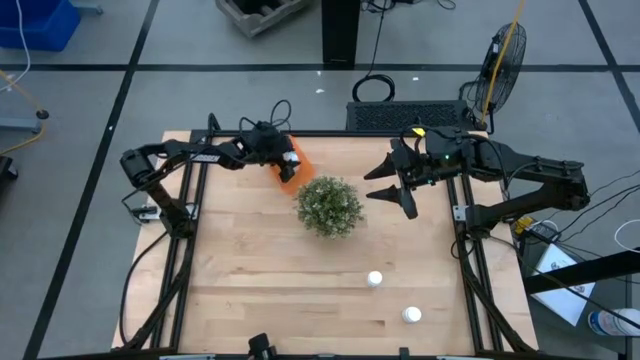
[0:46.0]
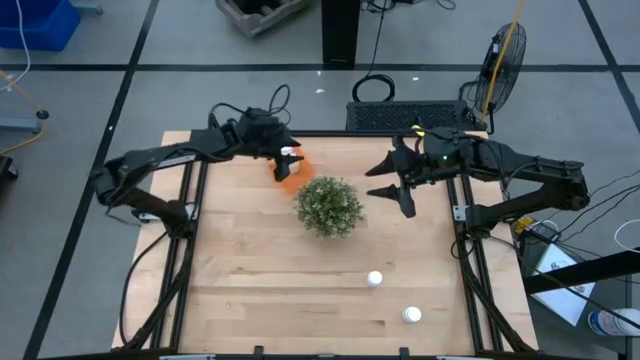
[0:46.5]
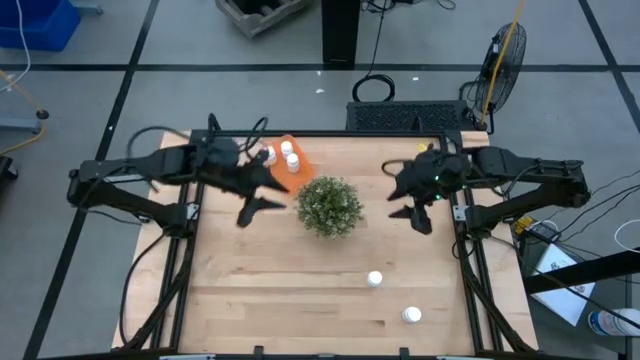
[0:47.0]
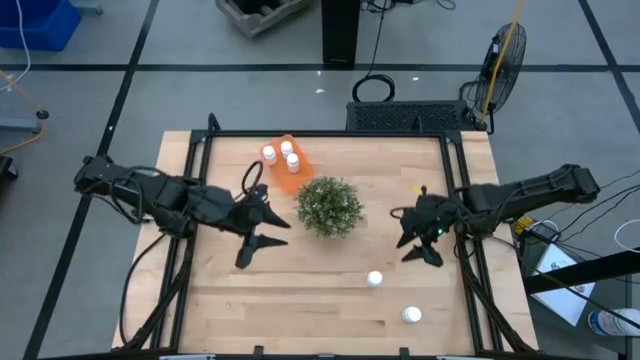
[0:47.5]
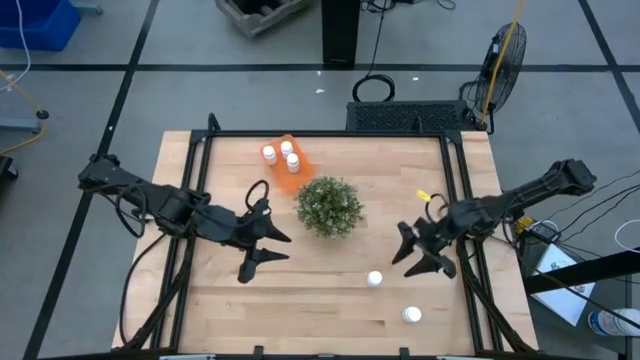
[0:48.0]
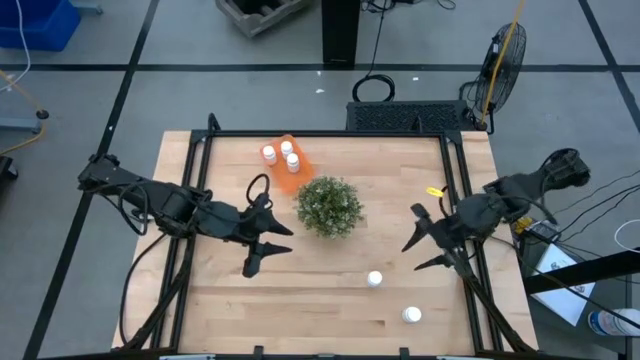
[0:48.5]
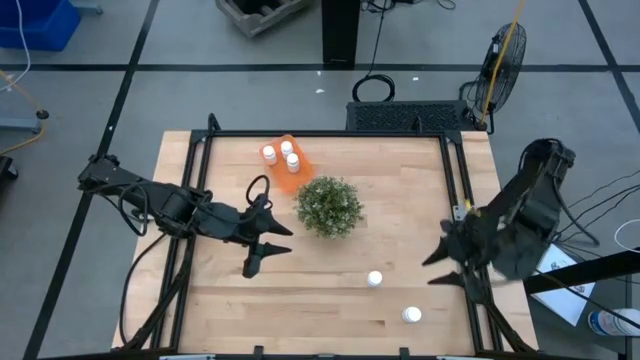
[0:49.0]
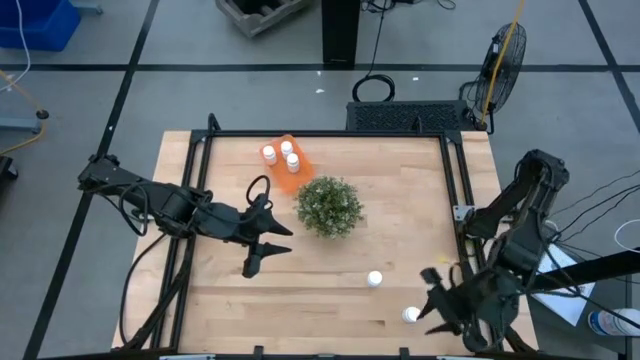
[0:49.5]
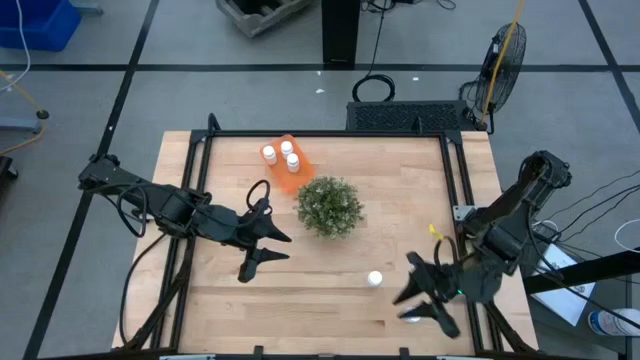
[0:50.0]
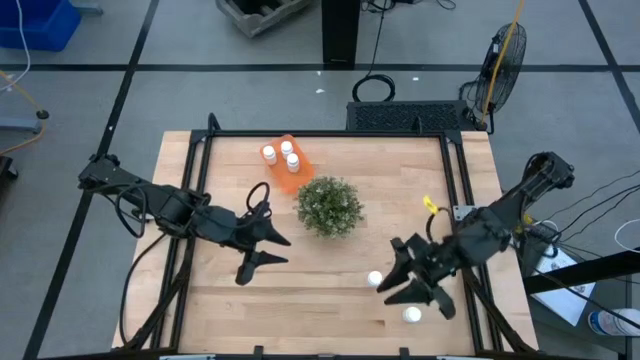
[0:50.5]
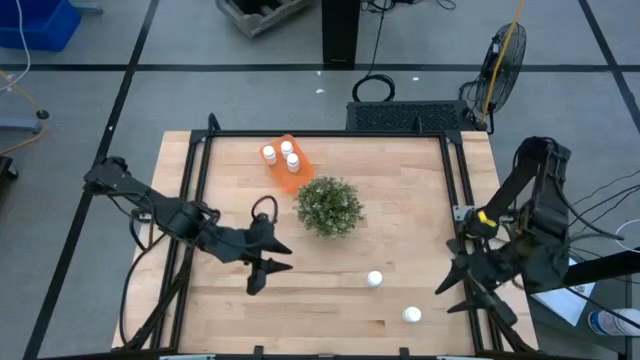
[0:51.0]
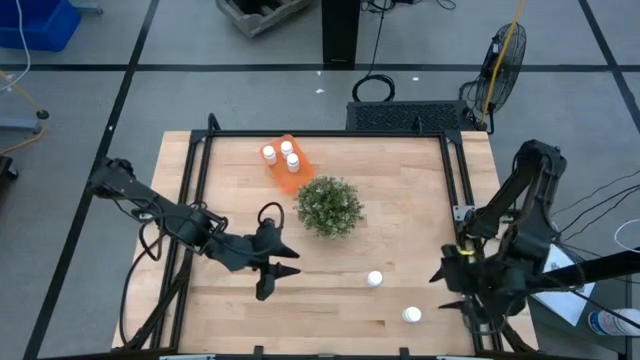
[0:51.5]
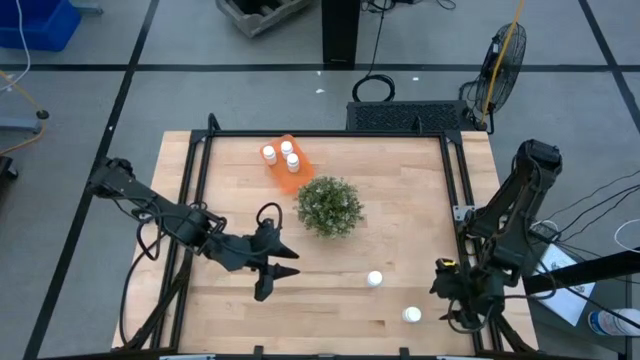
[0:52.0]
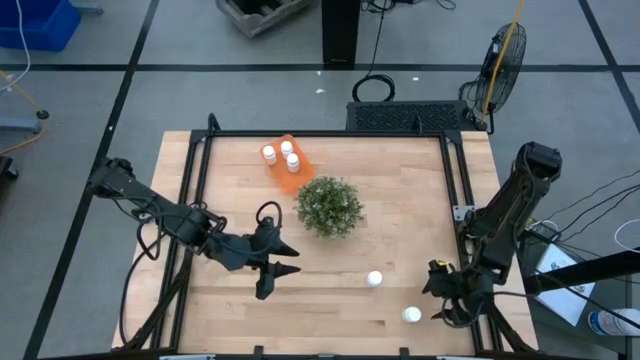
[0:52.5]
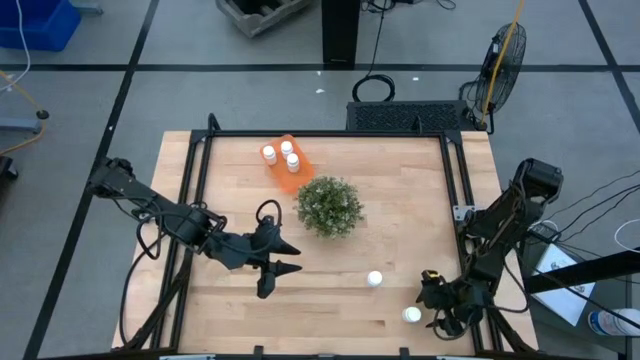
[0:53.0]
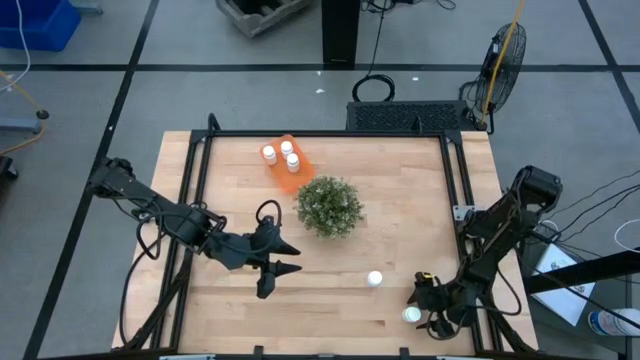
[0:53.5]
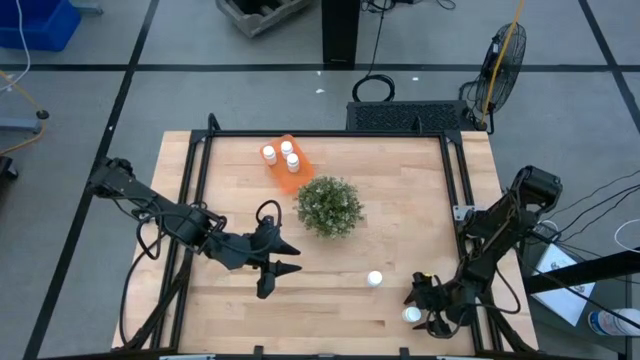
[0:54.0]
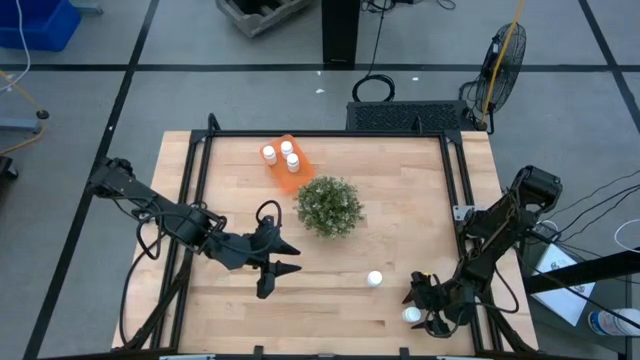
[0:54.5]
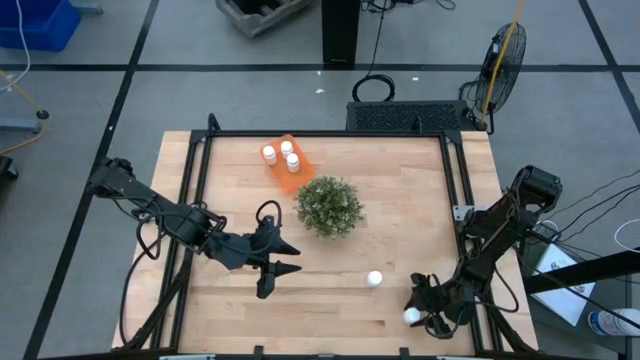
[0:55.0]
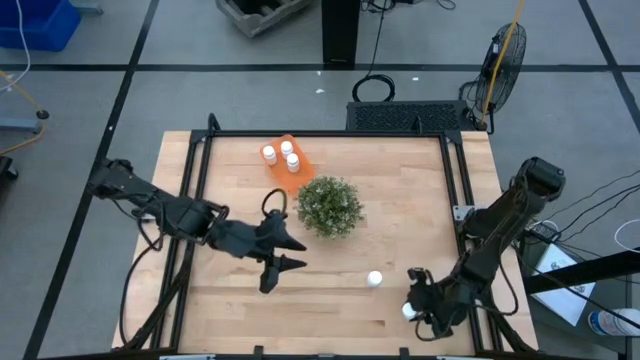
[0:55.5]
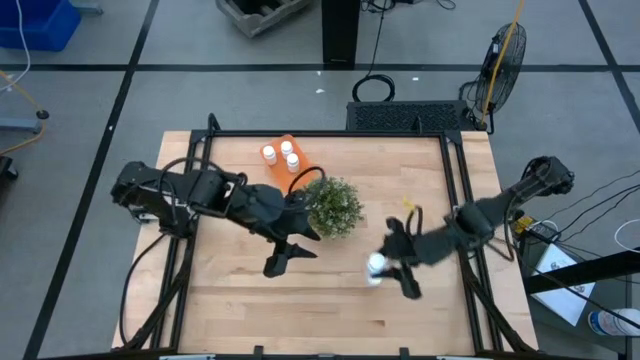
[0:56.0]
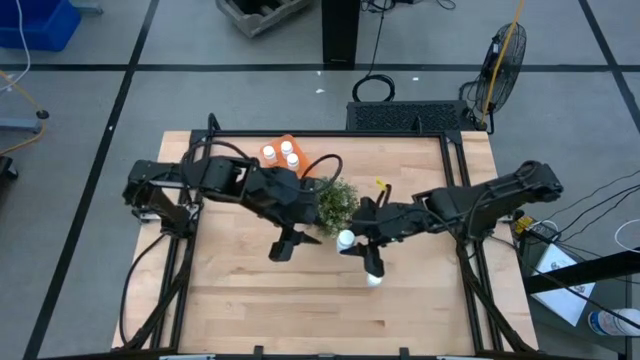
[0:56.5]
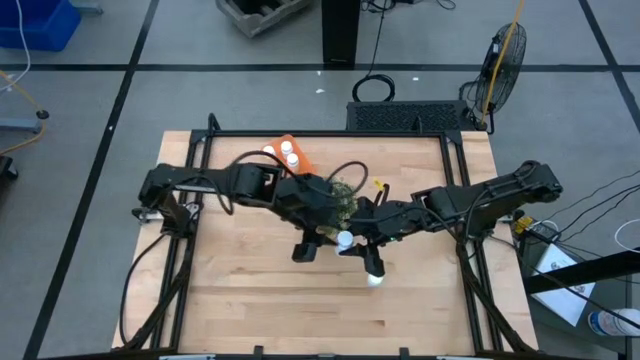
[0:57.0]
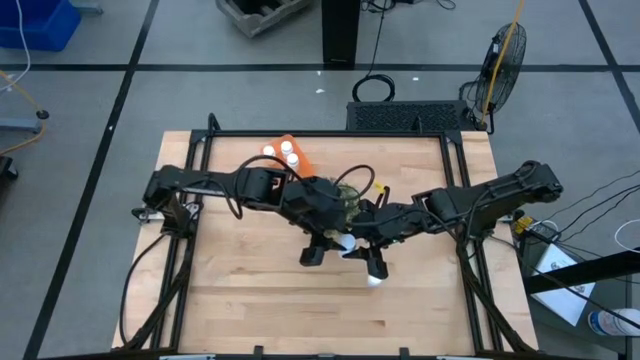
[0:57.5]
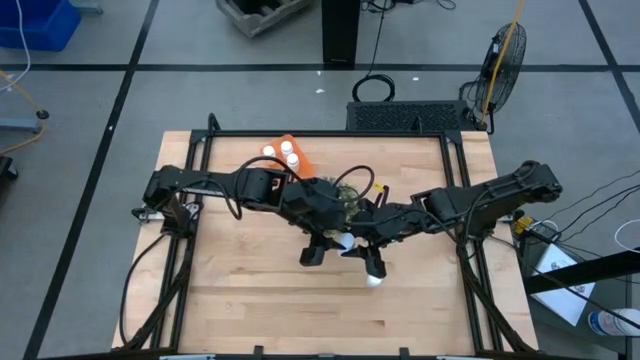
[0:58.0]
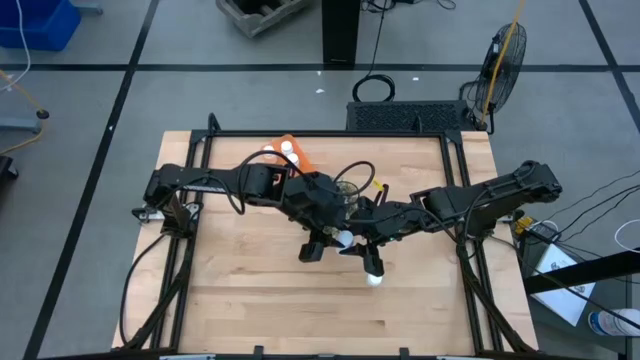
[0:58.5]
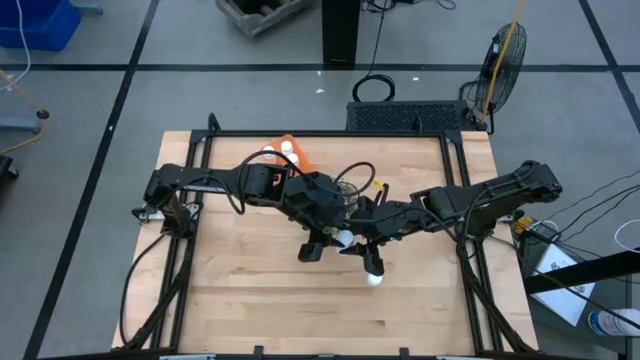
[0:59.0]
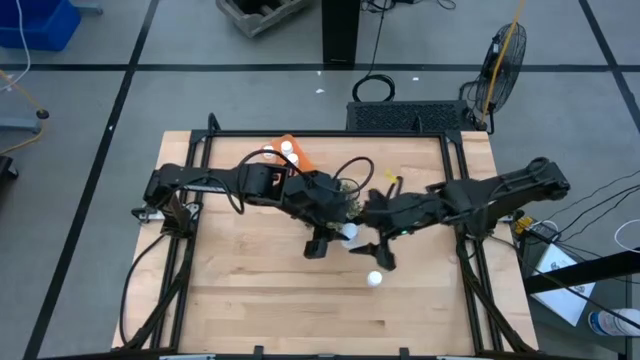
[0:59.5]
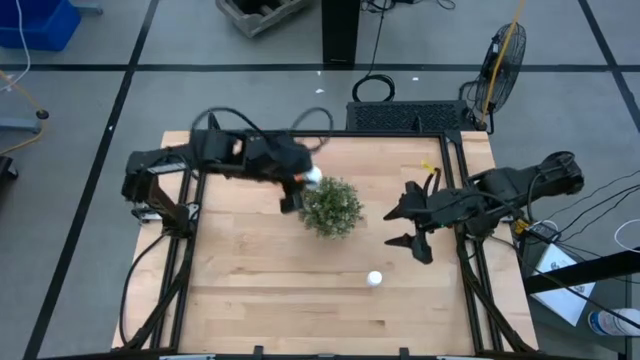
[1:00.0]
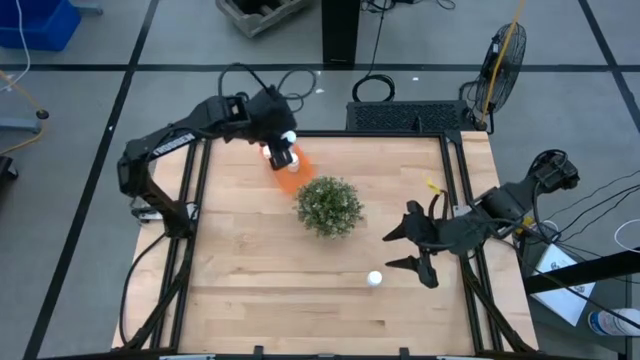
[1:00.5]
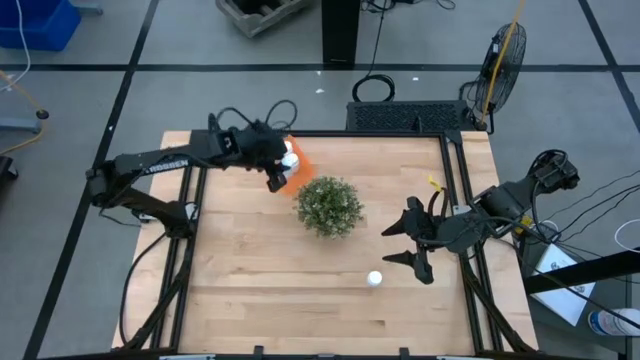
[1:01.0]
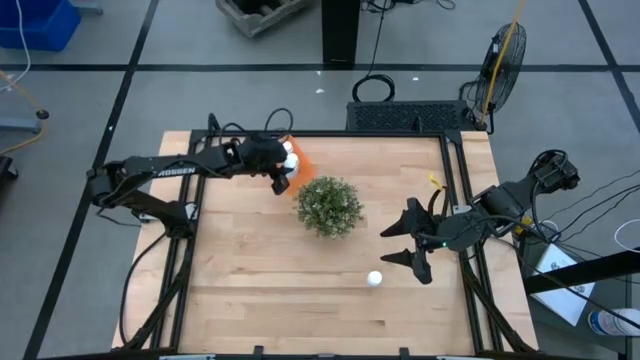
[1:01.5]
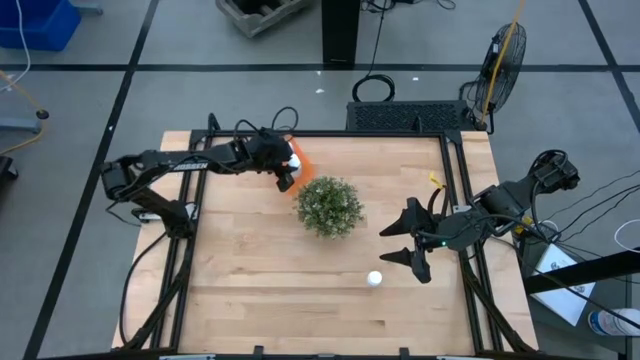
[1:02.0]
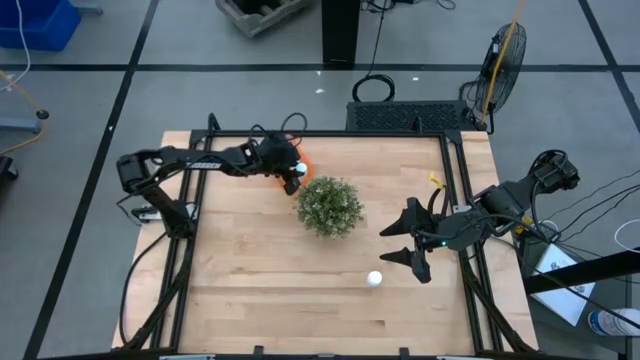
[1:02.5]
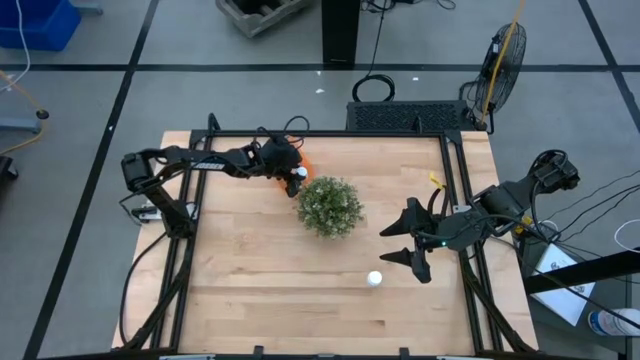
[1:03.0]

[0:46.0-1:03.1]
Task: Pick and place pill bottles into a basket
Put the white medicine bottle into the orange bin

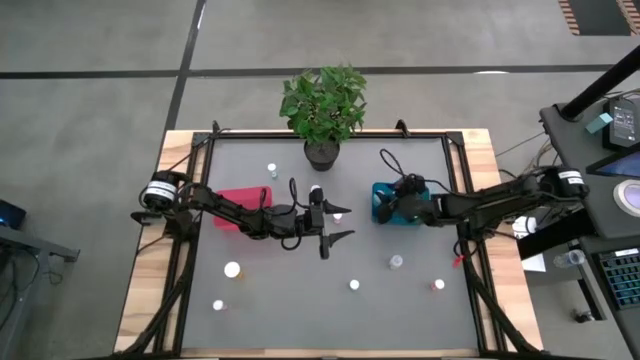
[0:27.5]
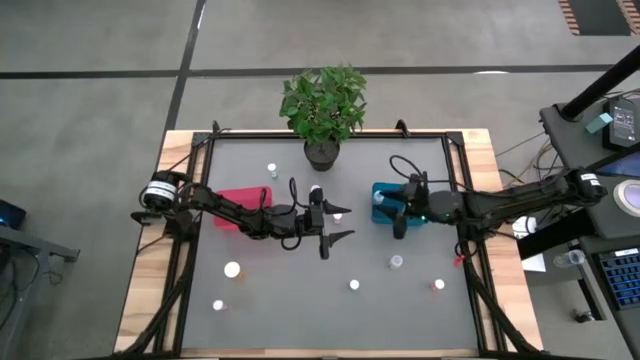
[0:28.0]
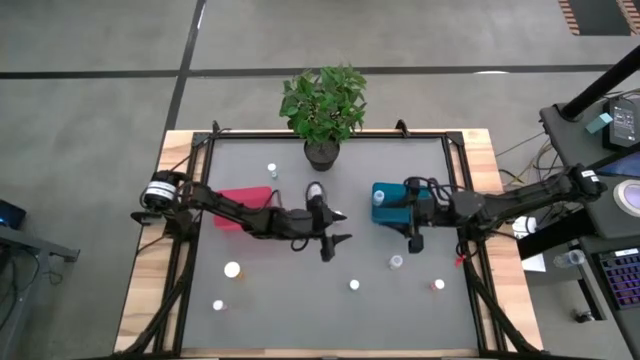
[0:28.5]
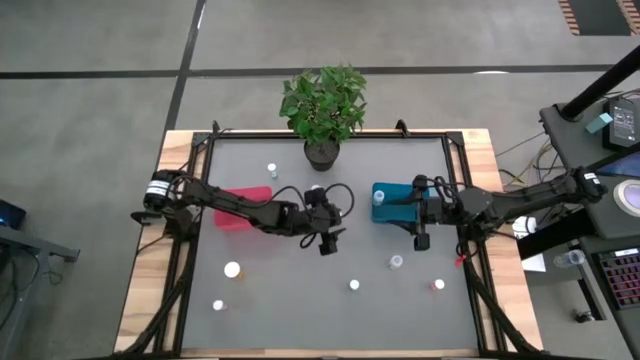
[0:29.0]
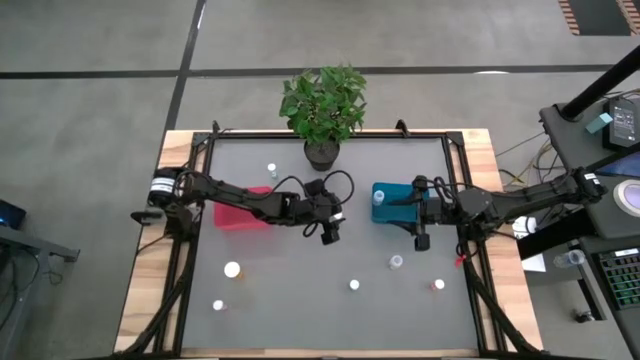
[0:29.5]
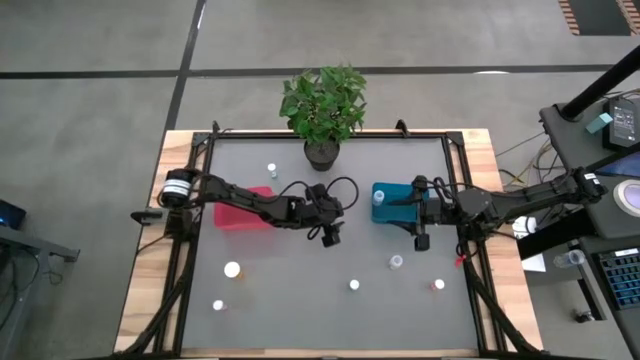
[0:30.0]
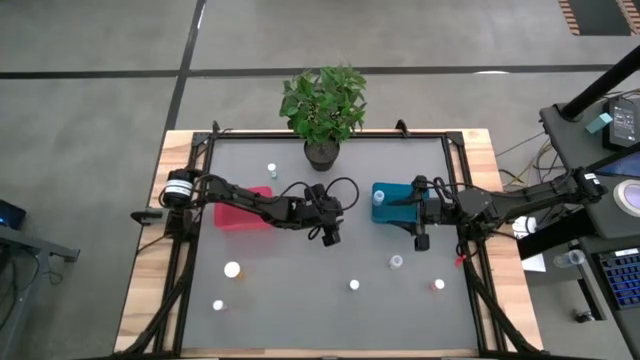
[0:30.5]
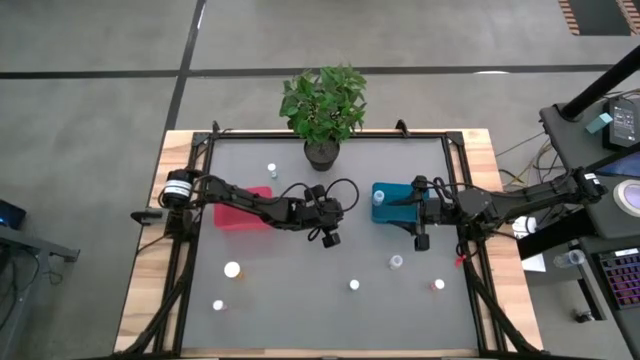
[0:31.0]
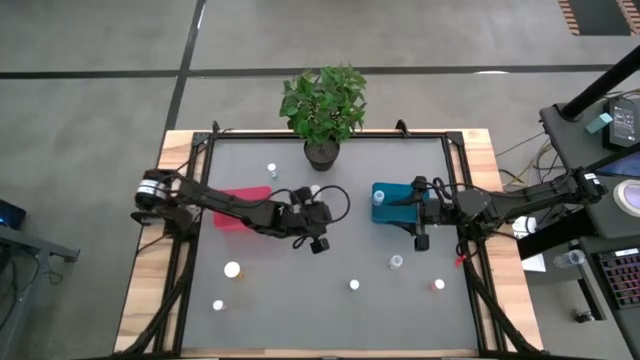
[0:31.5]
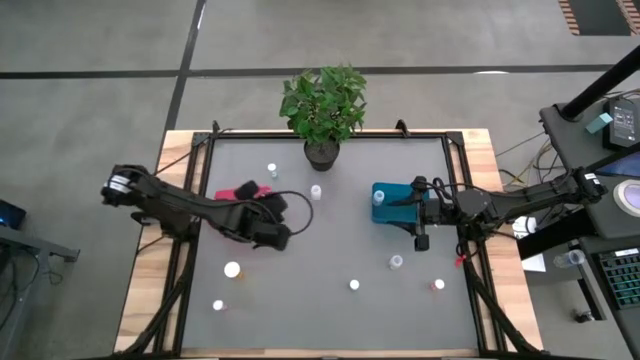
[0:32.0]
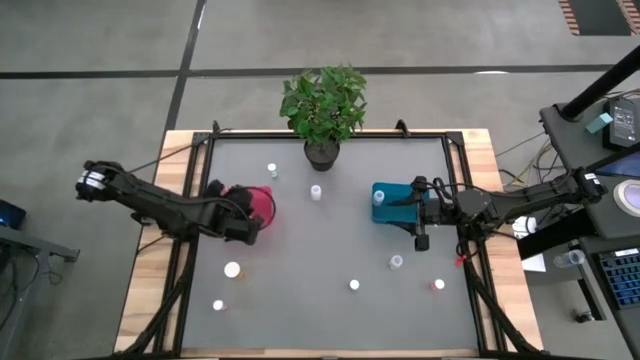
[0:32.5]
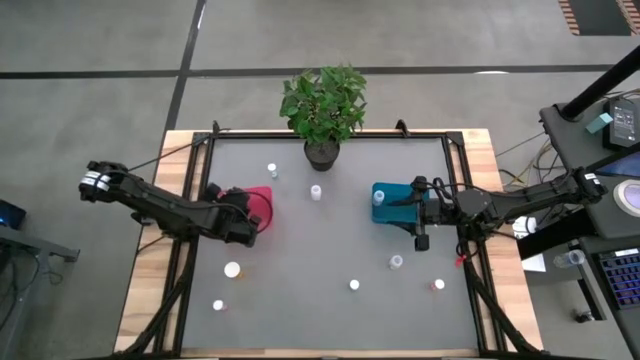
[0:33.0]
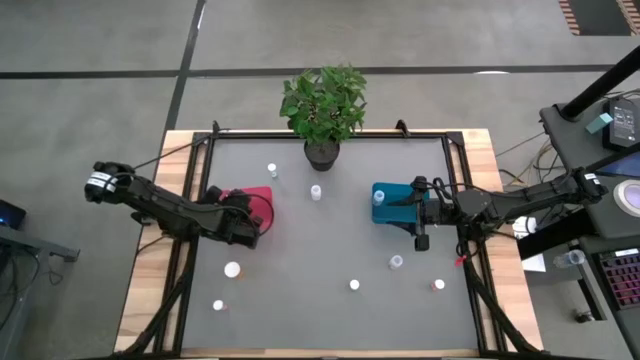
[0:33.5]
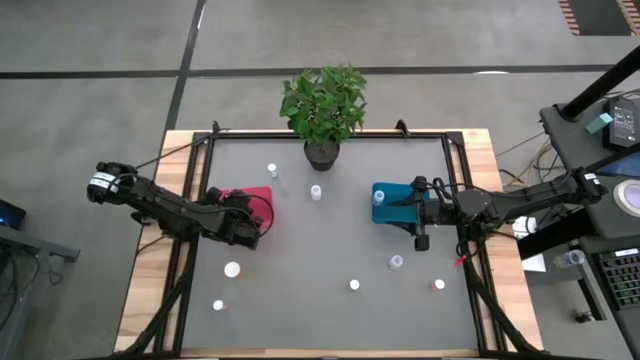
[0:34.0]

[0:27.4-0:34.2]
Task: Pick and place medicine bottles into bin by pill shape (circle, oval)
Put the top pink tablet bottle into the red bin
